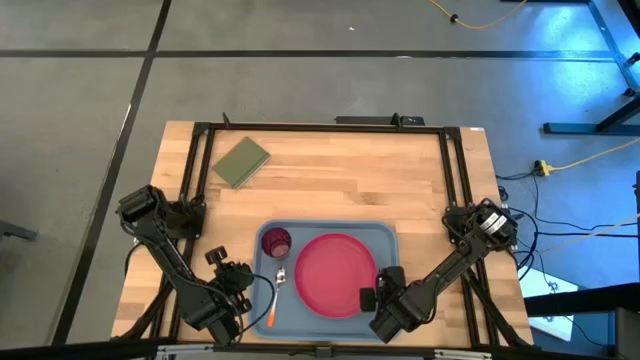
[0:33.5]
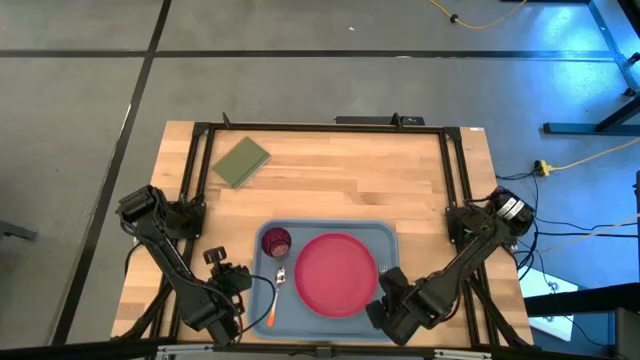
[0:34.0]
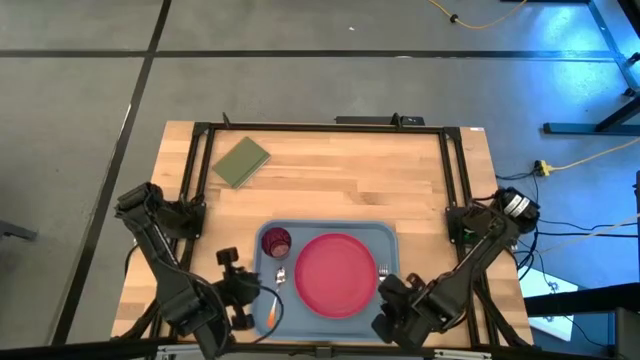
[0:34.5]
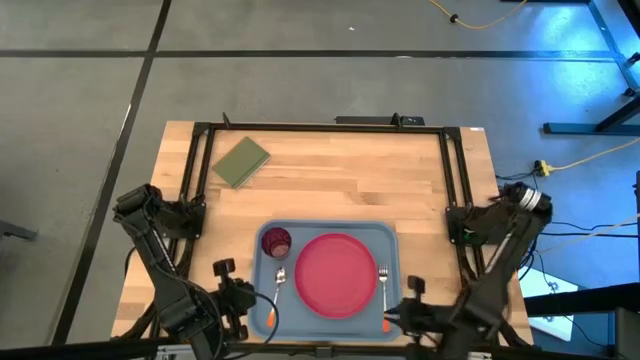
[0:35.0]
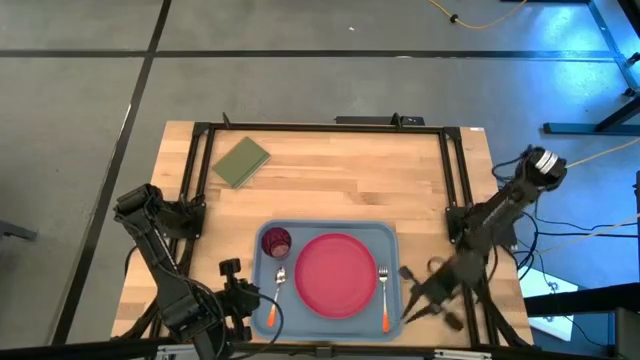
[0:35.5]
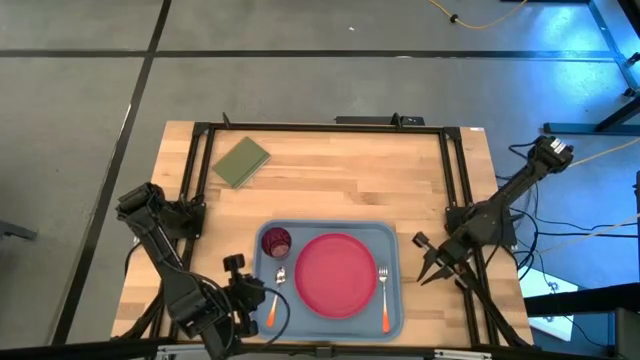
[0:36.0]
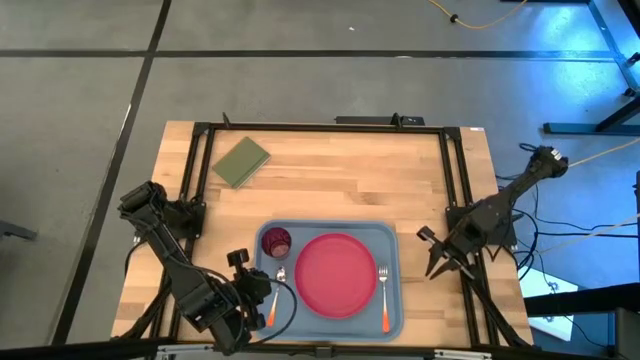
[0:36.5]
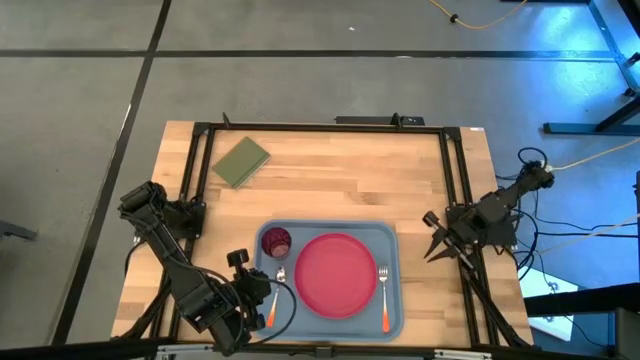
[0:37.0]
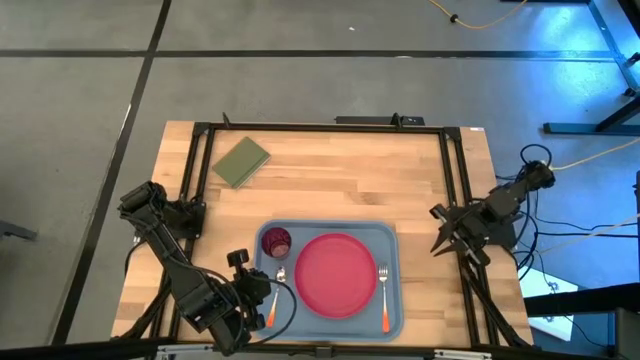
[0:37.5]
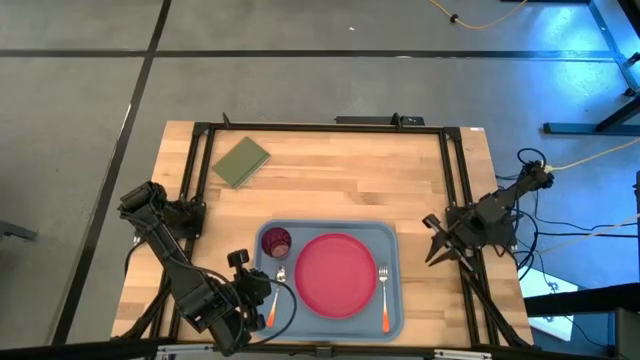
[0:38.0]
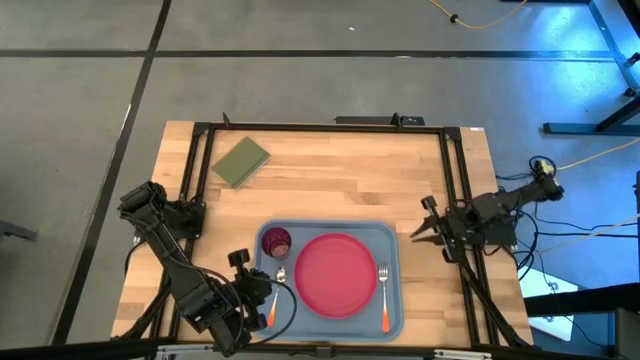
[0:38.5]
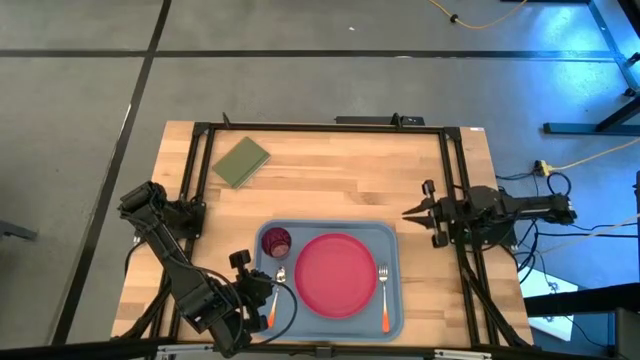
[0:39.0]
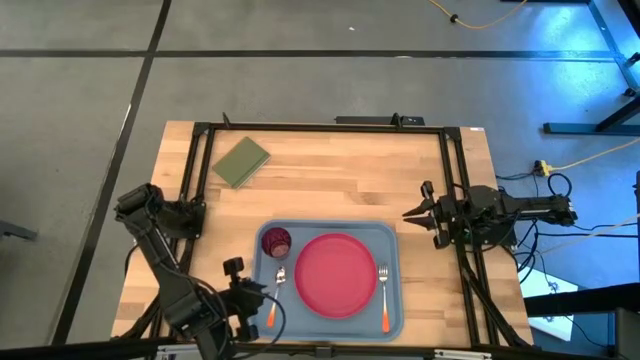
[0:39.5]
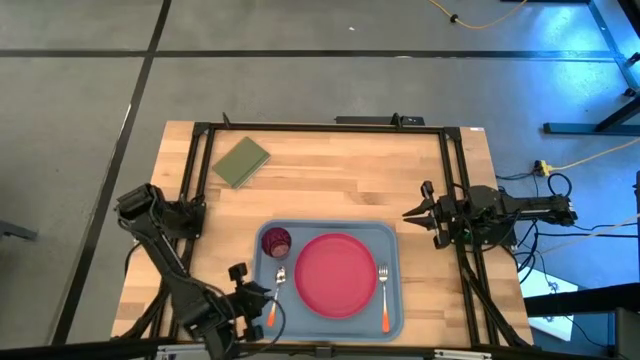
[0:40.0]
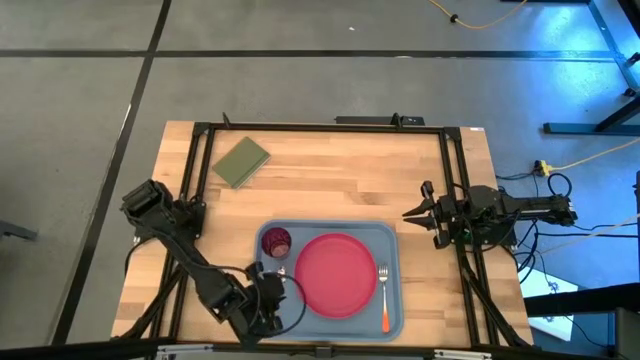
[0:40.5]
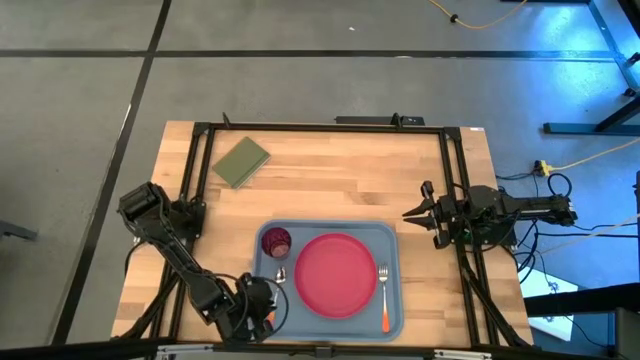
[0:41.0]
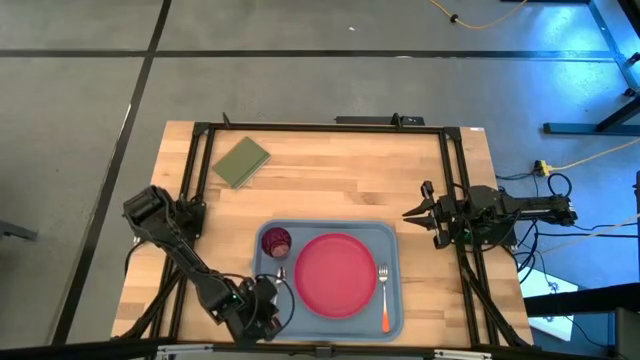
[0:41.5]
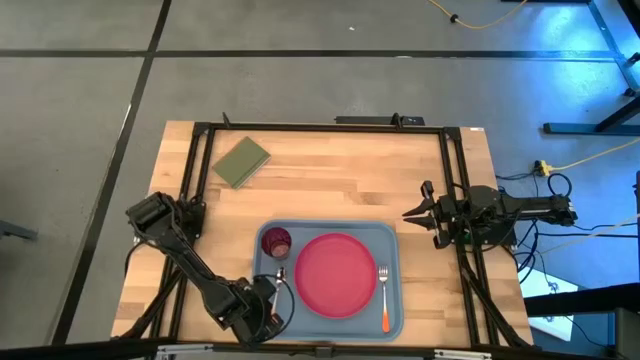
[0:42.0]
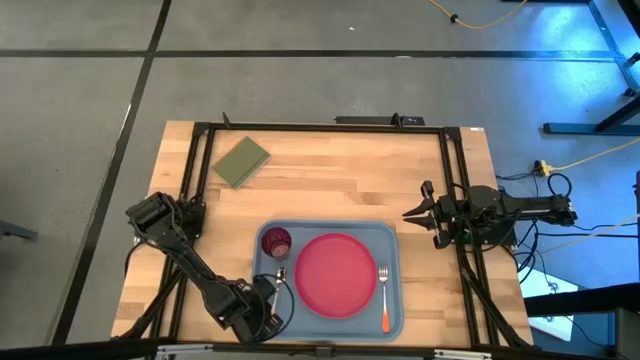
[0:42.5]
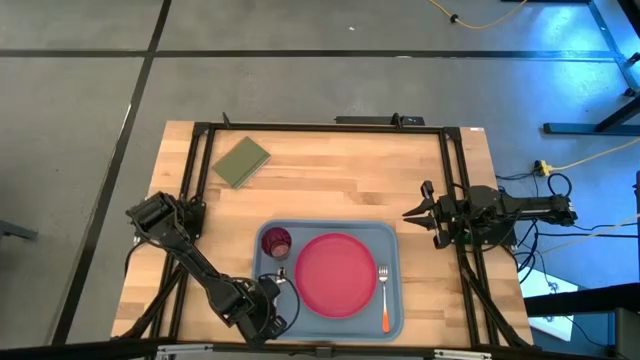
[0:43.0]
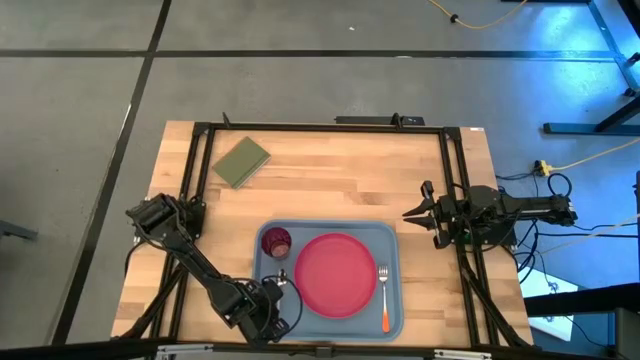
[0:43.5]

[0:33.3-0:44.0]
Task: Pick and place plate/cup/fork/spoon on tray
Adjust the orange spoon

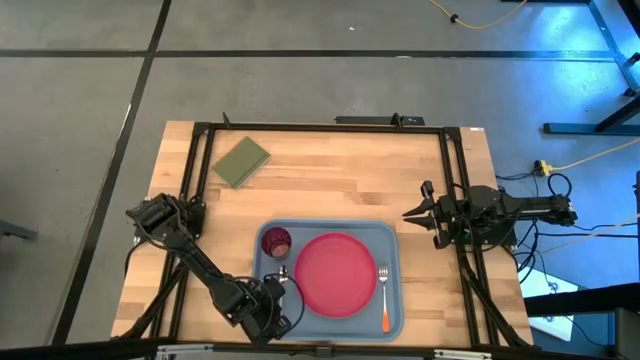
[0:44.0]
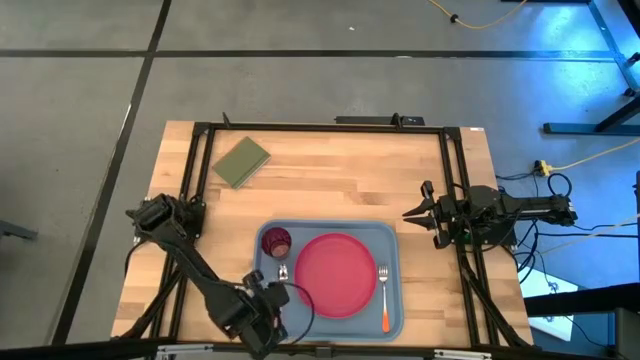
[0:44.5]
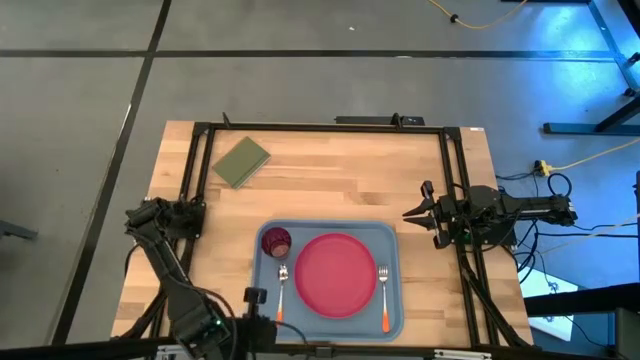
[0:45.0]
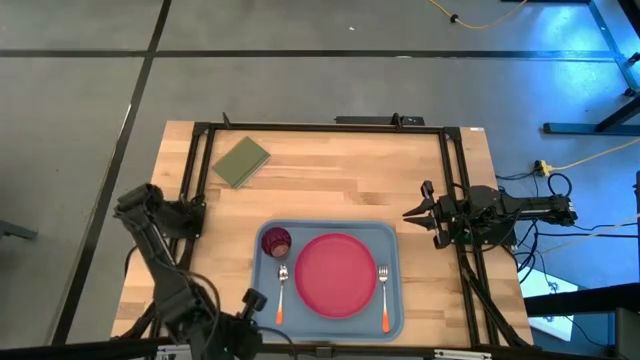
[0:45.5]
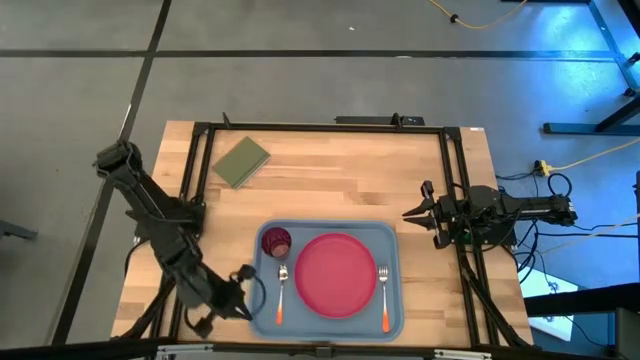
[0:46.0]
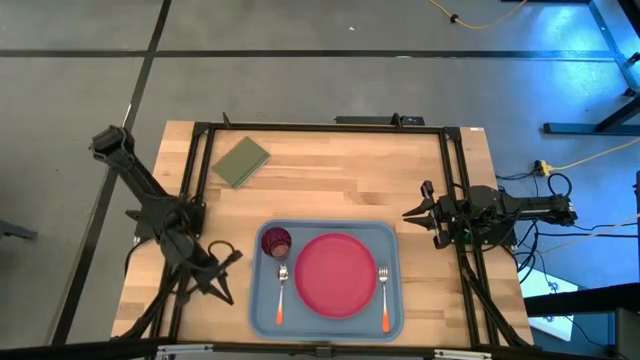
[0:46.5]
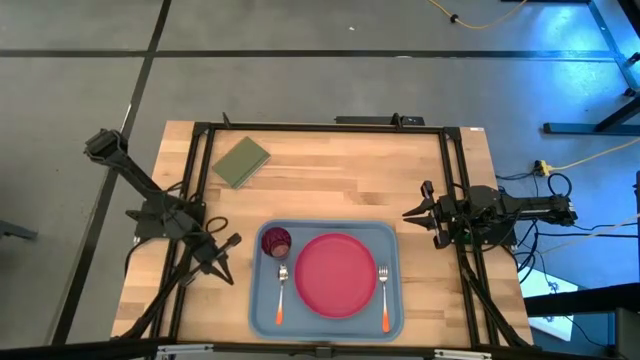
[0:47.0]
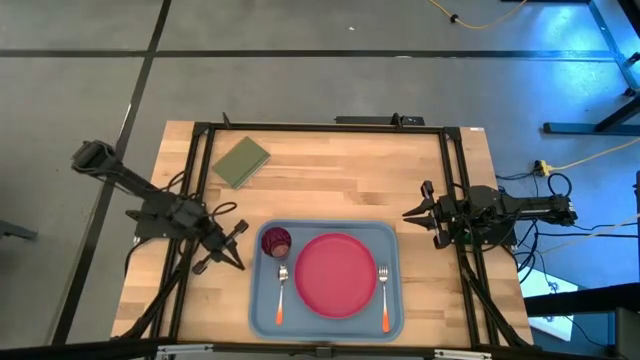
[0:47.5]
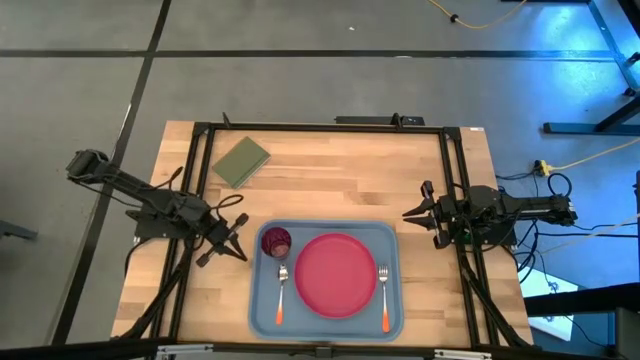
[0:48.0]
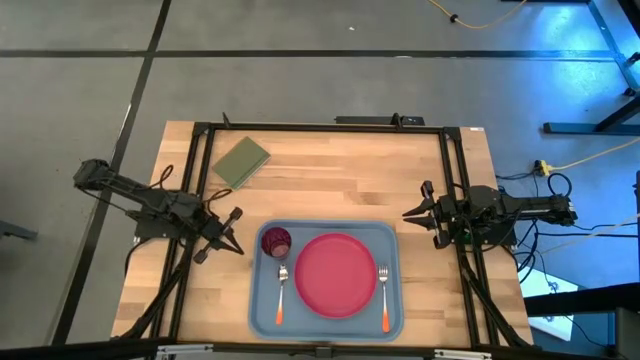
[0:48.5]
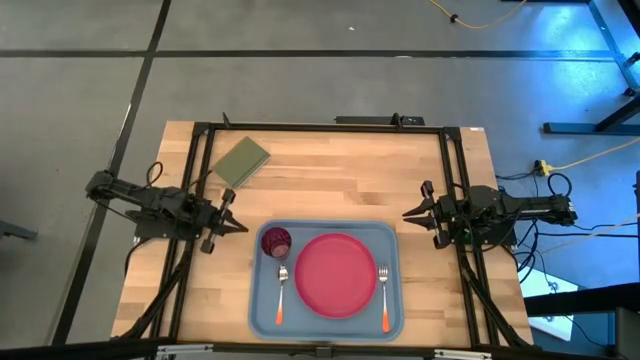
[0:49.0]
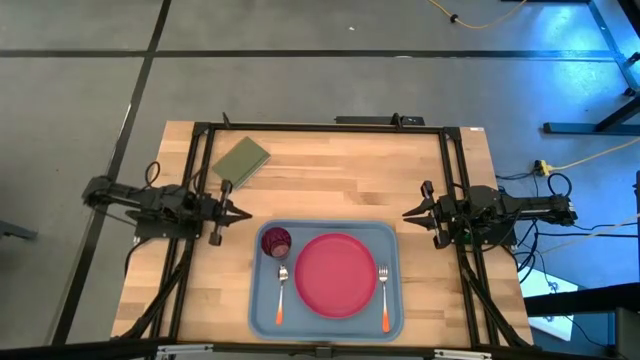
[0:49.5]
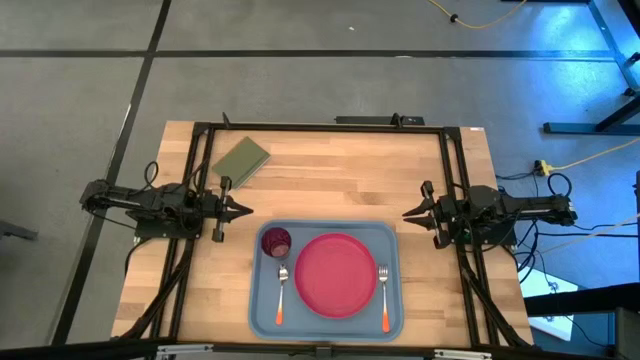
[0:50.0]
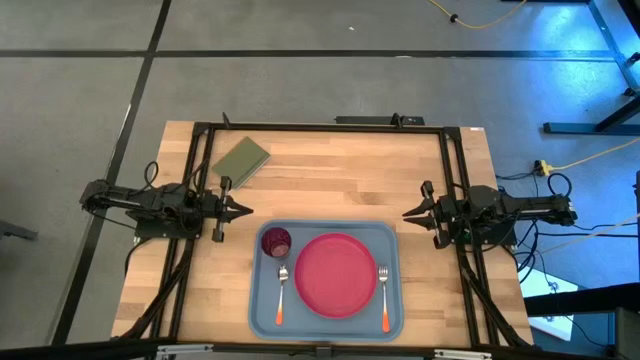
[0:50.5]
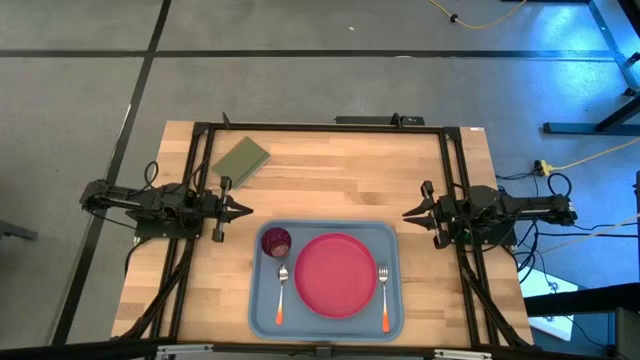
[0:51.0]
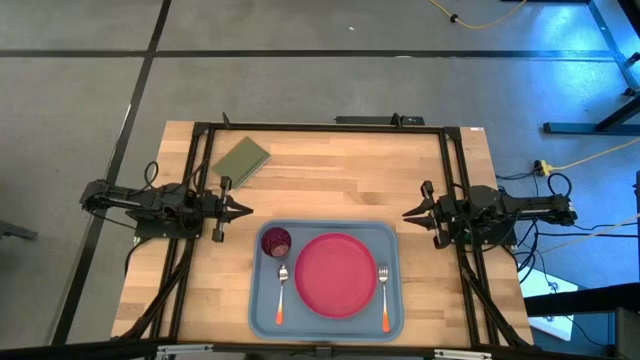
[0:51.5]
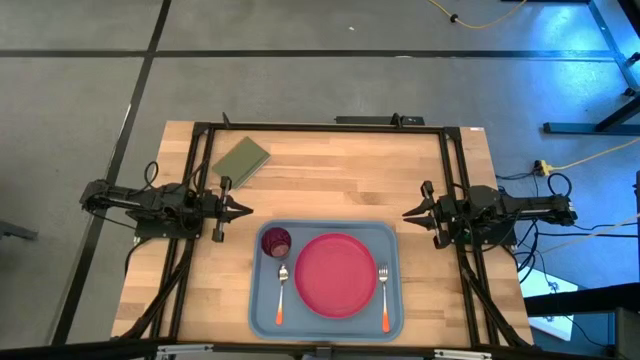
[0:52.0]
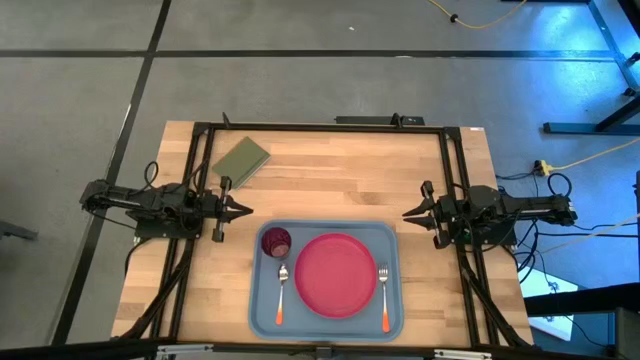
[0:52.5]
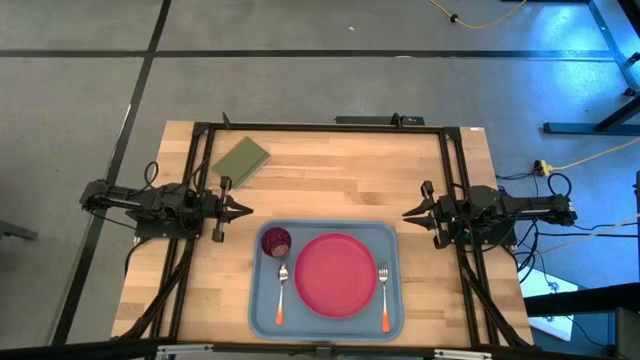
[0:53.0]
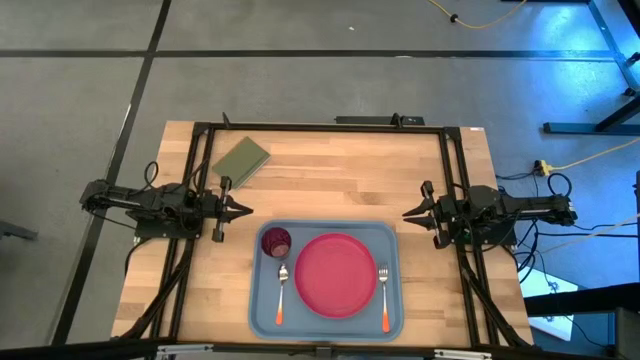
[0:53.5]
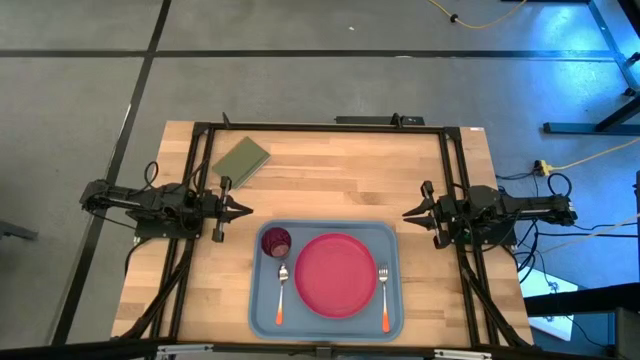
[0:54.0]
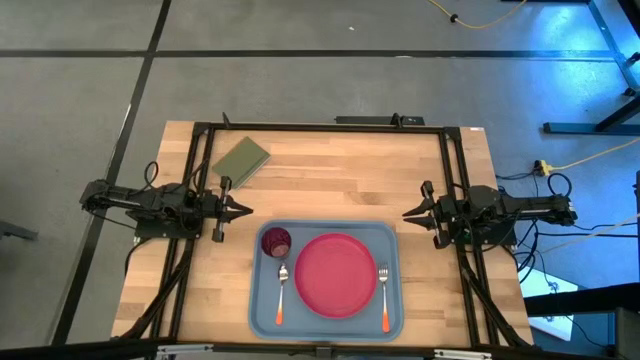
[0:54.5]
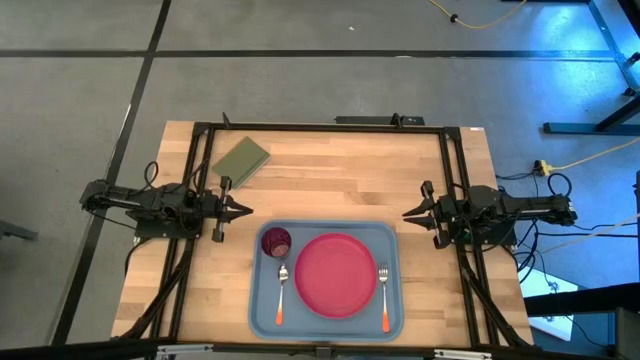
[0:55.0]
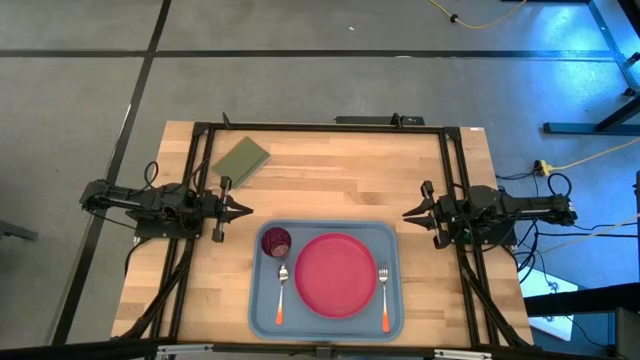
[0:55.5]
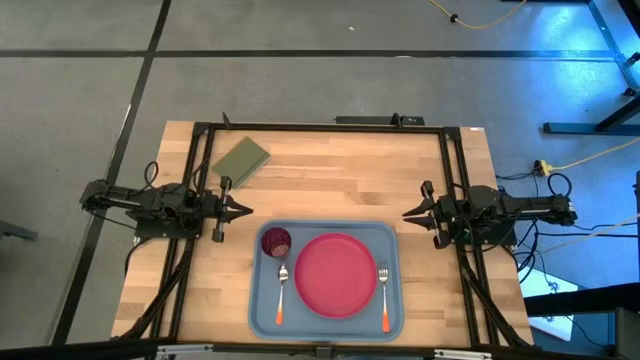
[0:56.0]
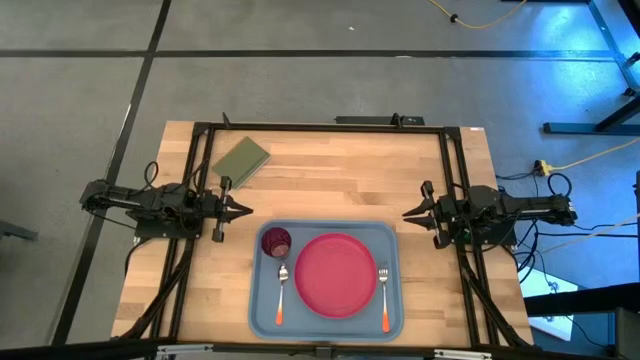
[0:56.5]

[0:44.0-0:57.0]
Return to Home Position
